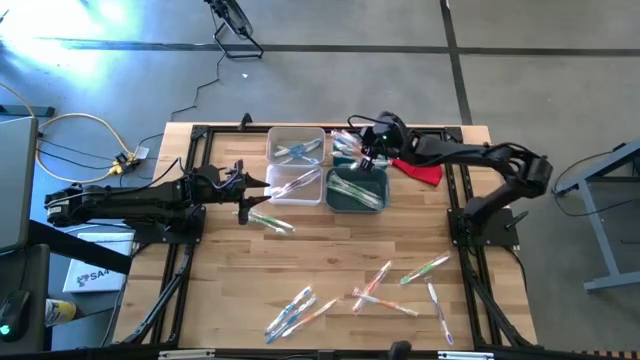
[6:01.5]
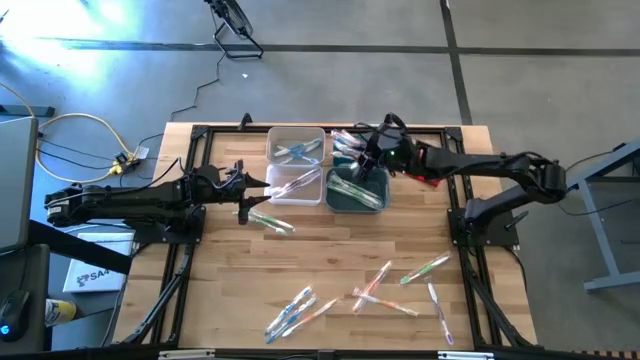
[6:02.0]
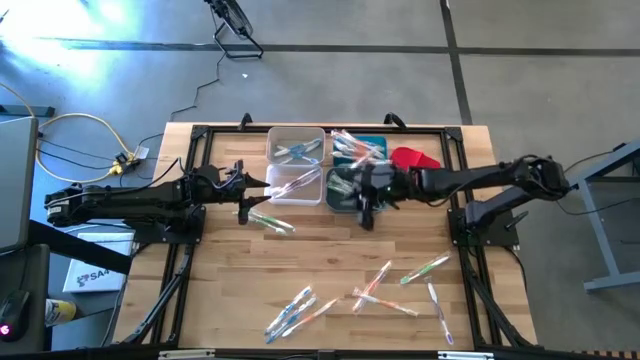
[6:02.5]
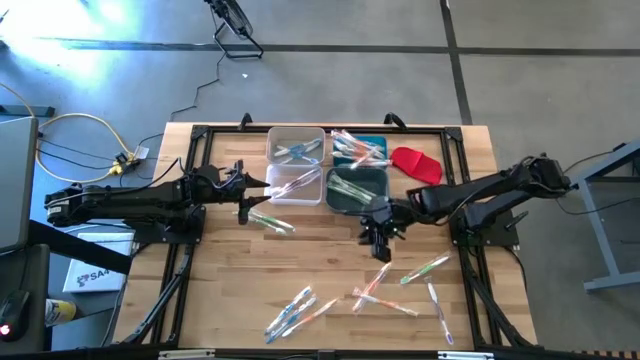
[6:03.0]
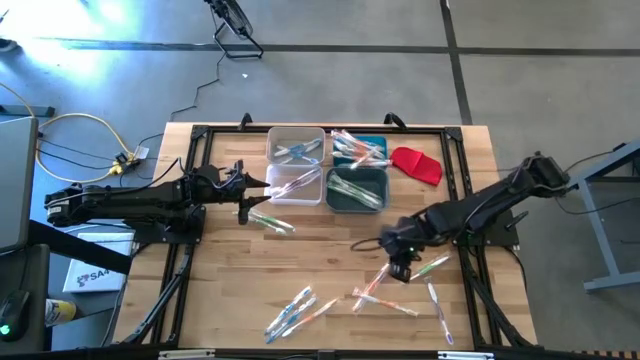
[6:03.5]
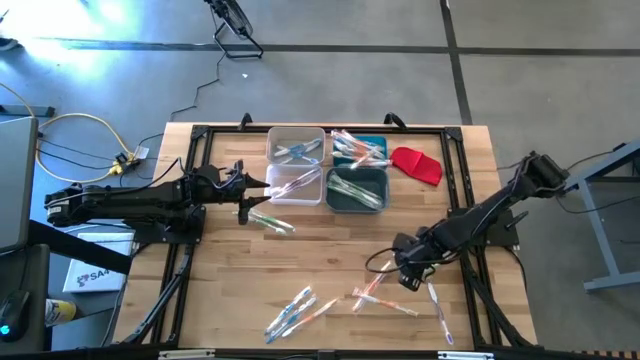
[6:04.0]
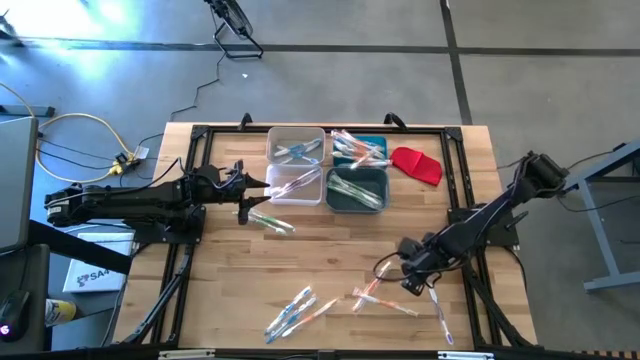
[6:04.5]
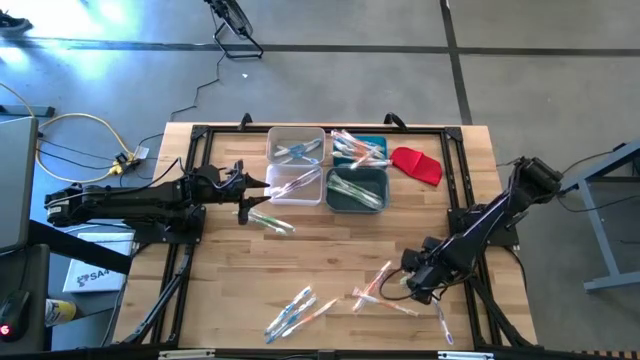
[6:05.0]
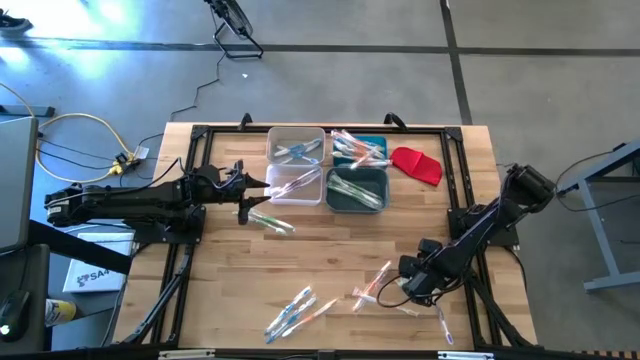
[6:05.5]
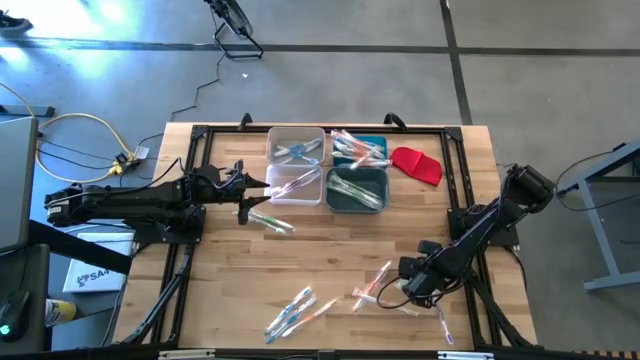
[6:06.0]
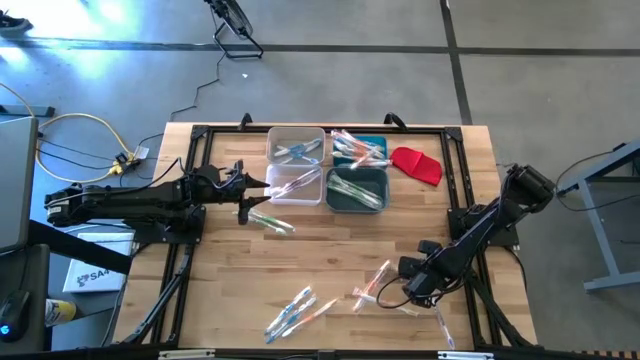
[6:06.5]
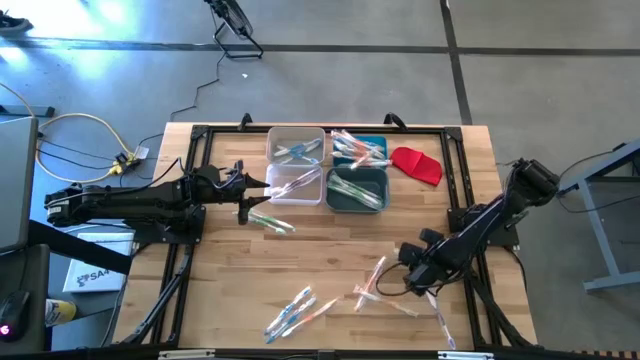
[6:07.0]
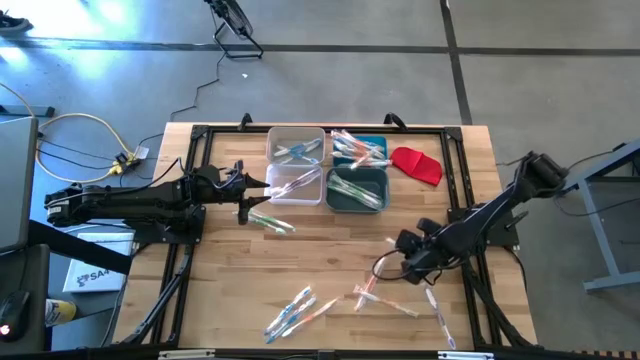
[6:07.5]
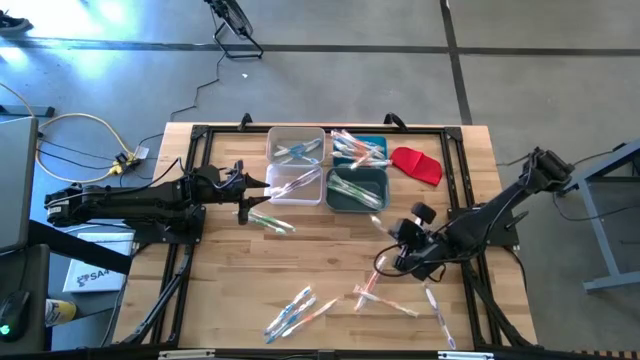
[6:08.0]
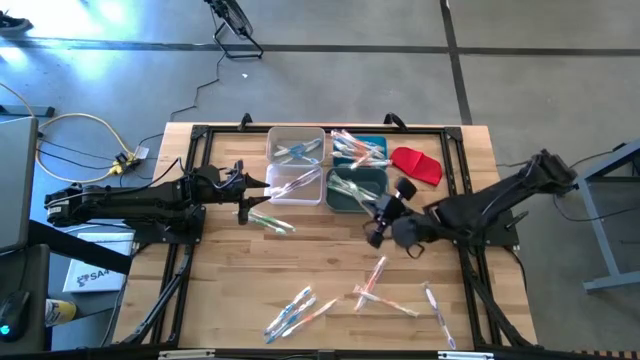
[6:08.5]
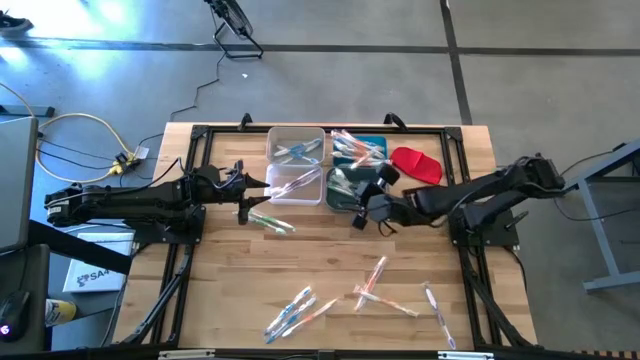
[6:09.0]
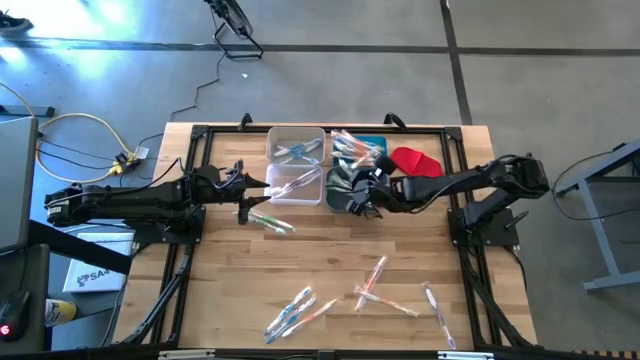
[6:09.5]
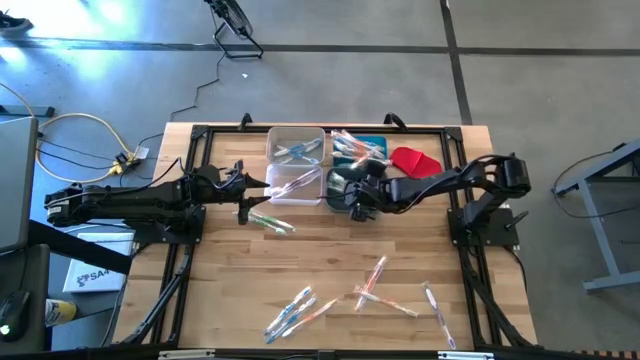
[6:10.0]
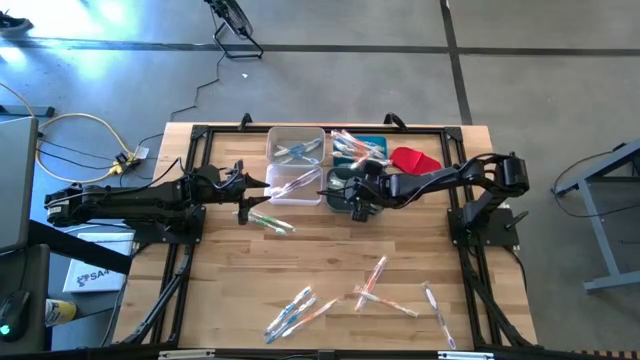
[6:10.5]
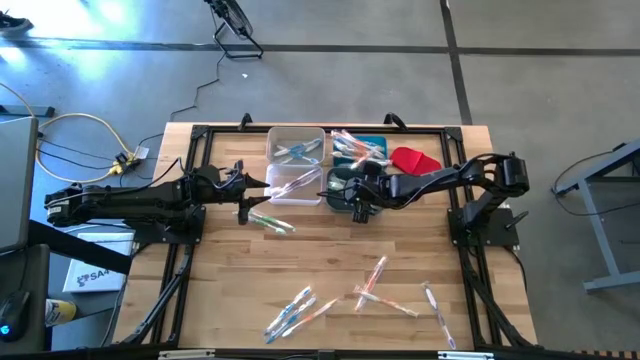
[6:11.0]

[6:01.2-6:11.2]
Task: Pick & Place Toothbrushes
Put the green toothbrush into the green bin

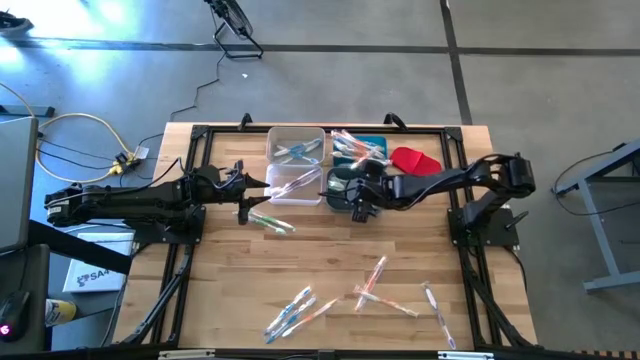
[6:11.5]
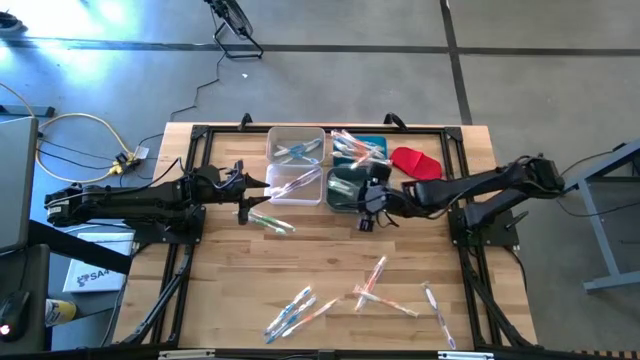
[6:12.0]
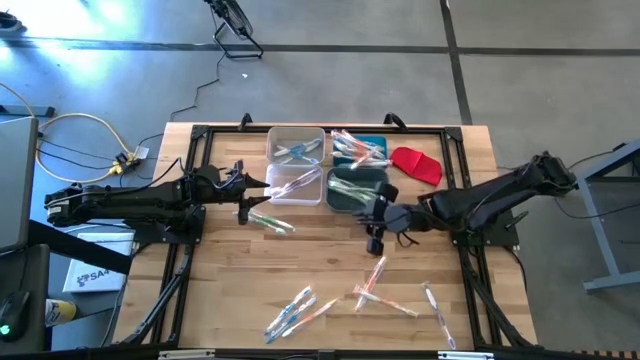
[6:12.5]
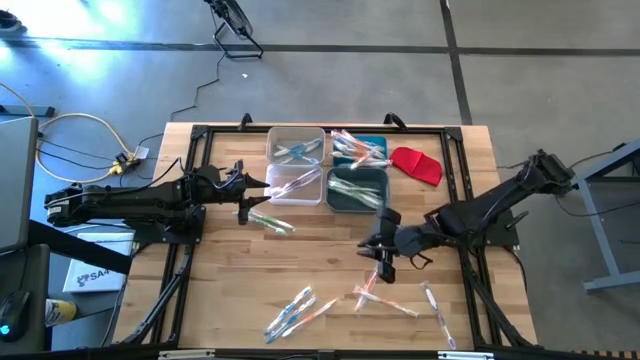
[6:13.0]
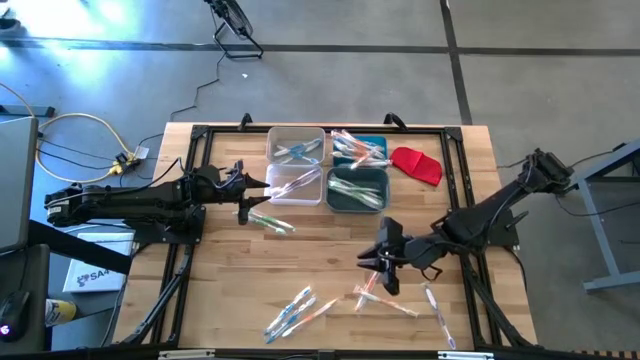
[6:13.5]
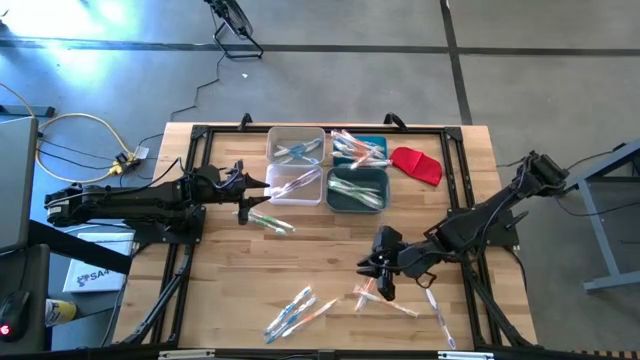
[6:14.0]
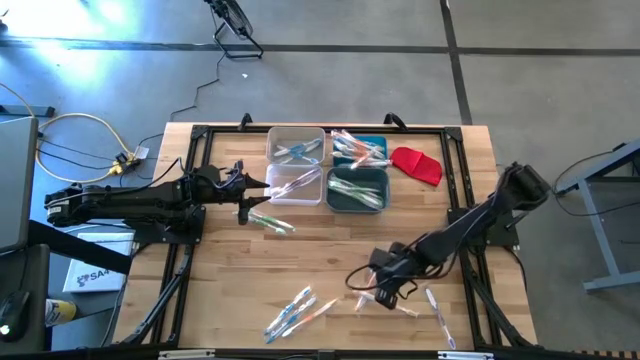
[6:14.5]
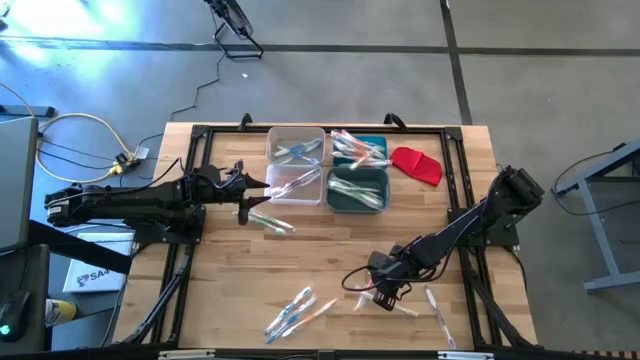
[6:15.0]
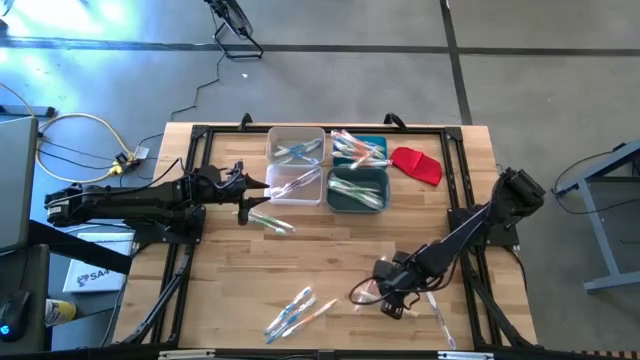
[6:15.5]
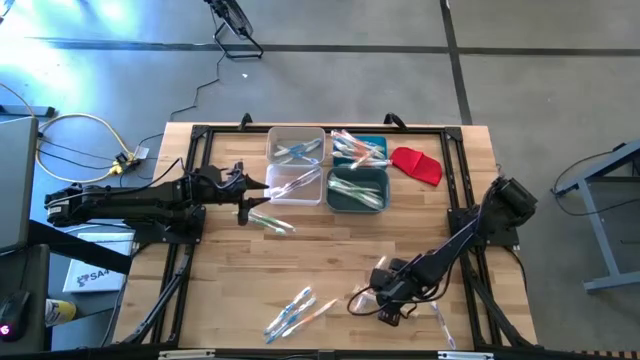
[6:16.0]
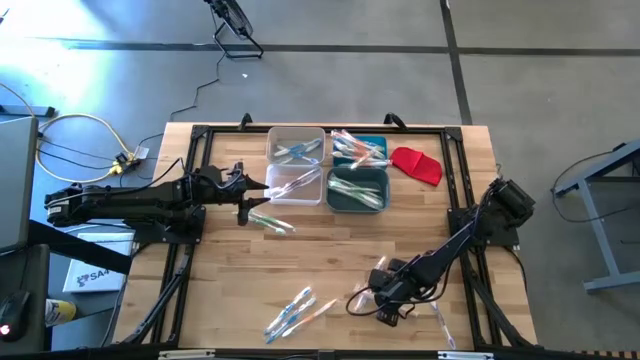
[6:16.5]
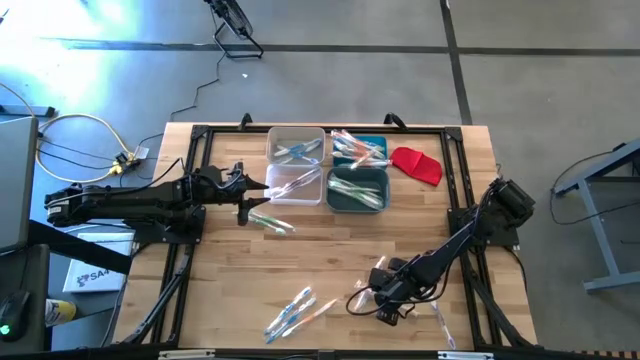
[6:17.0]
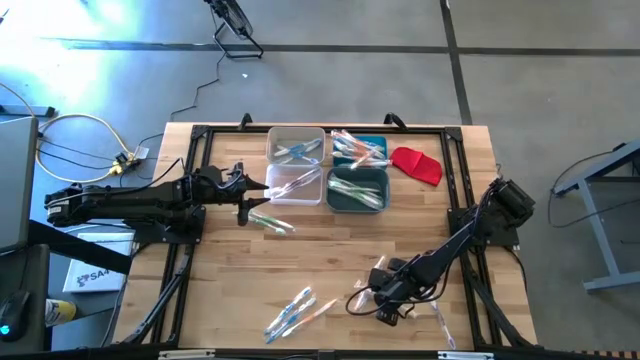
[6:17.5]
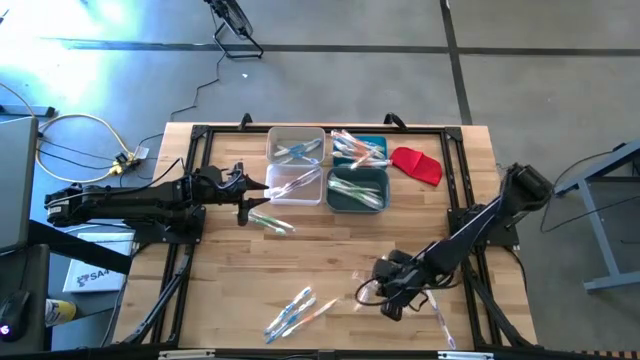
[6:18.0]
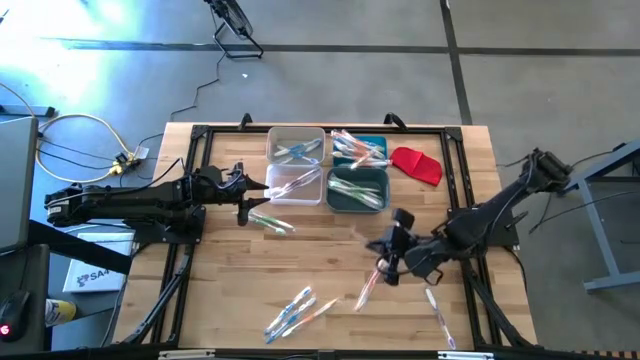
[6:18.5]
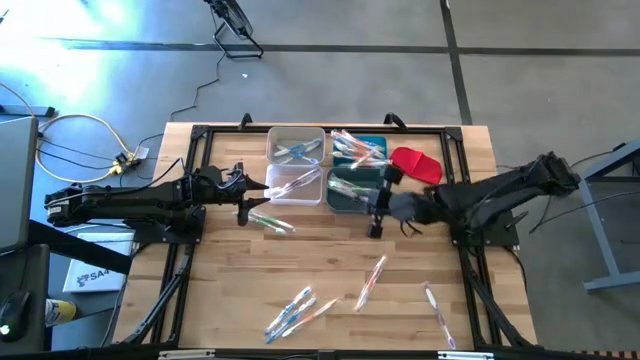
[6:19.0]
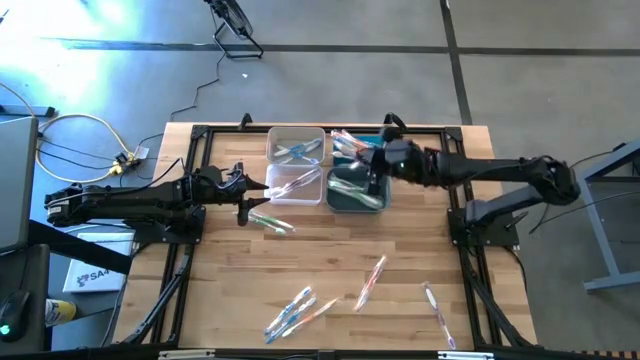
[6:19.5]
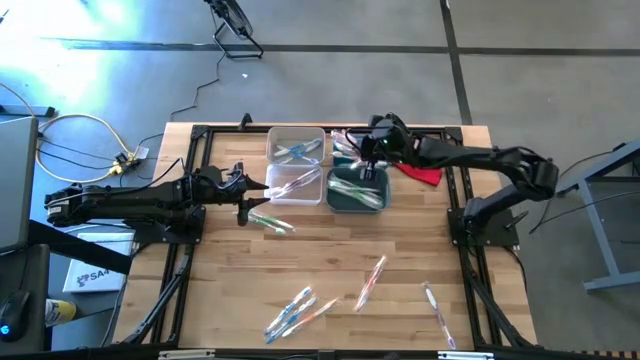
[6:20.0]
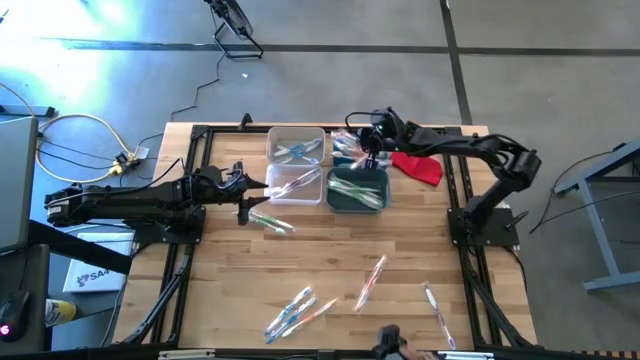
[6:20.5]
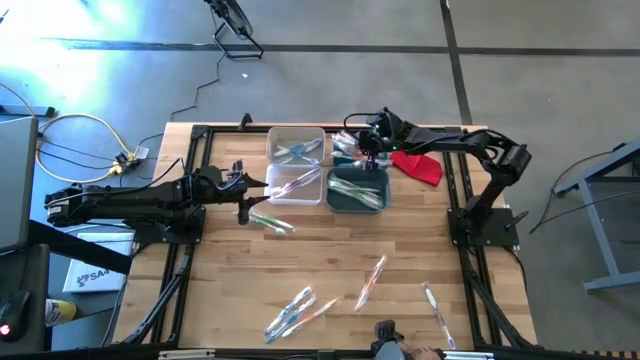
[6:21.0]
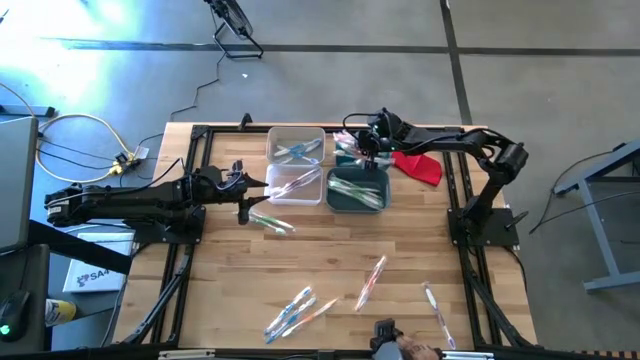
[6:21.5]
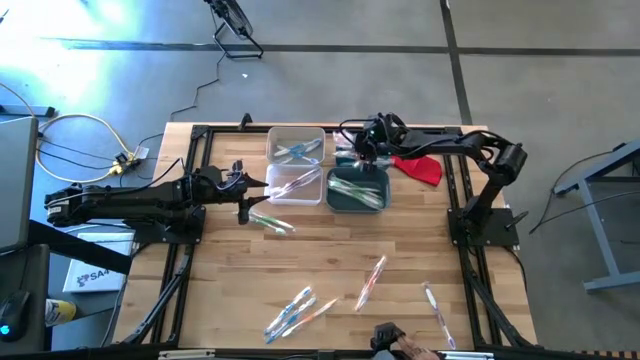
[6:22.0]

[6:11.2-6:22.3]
Put the orange toothbrush into the blue bin
